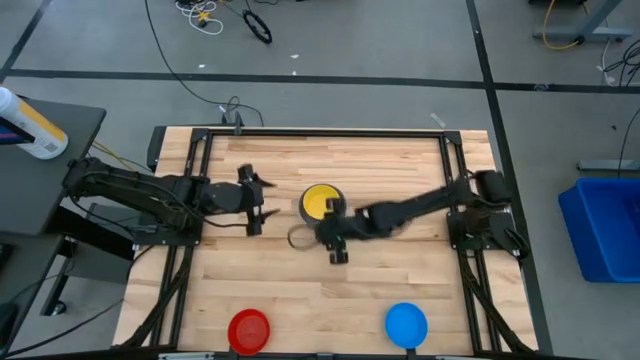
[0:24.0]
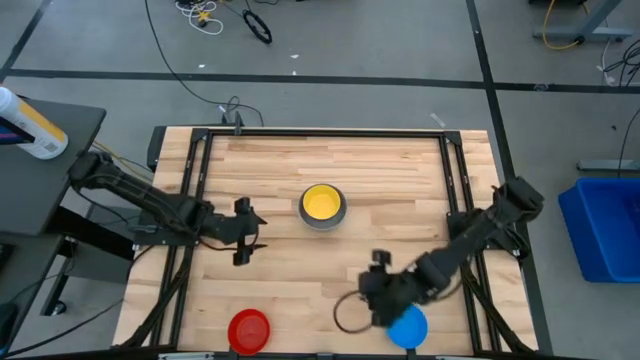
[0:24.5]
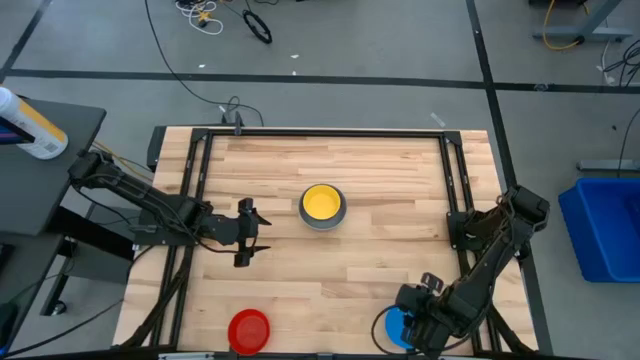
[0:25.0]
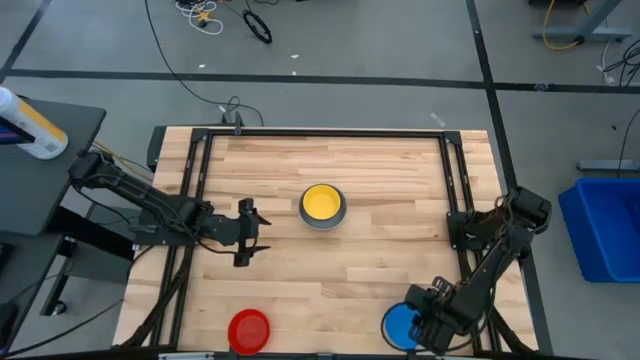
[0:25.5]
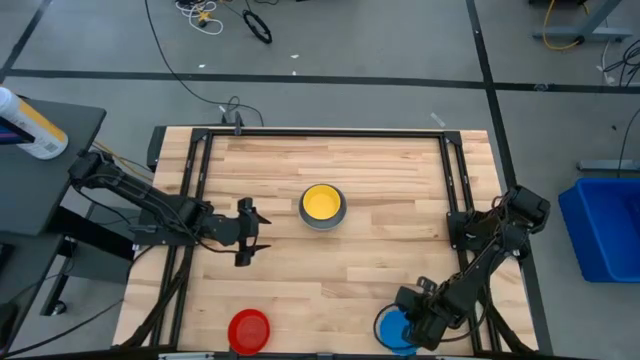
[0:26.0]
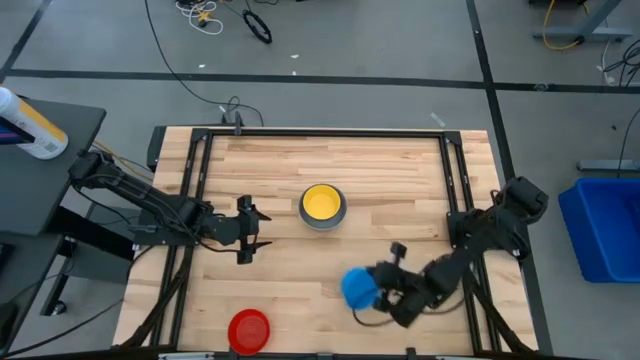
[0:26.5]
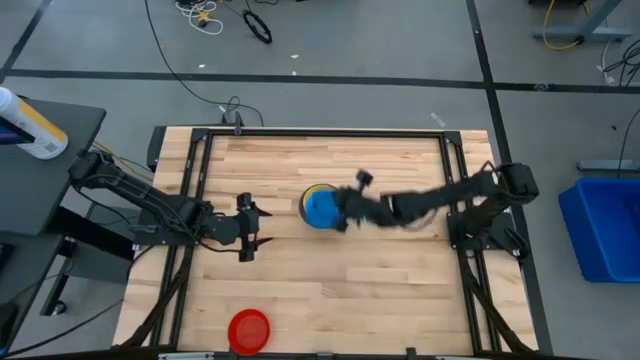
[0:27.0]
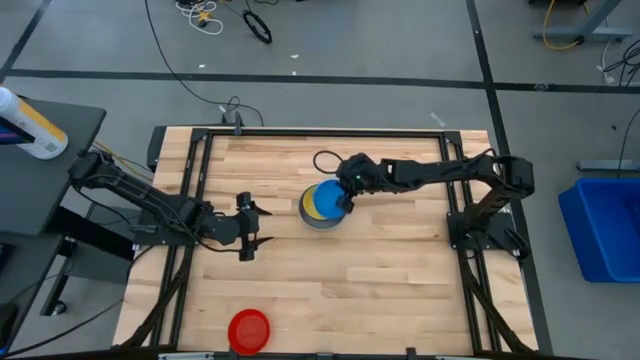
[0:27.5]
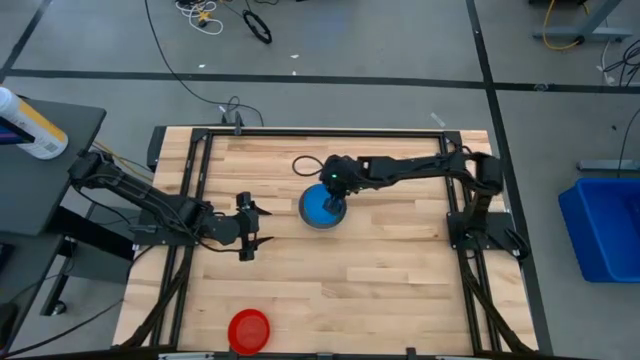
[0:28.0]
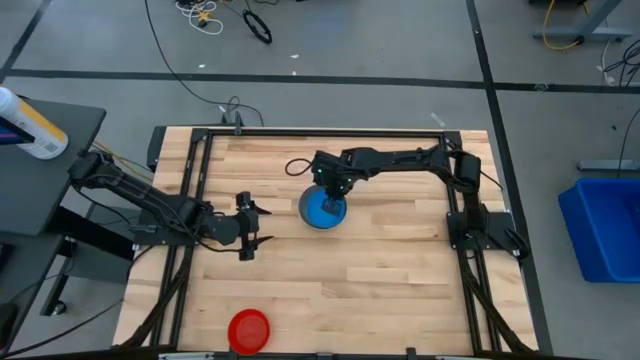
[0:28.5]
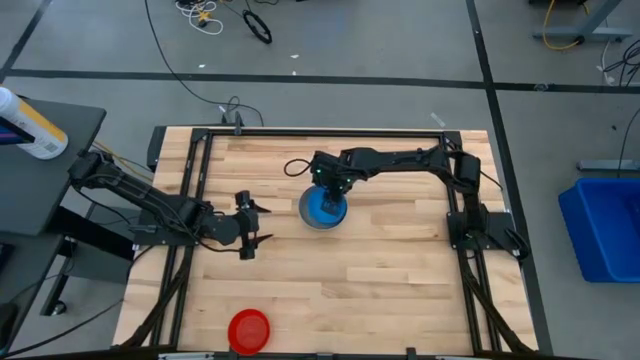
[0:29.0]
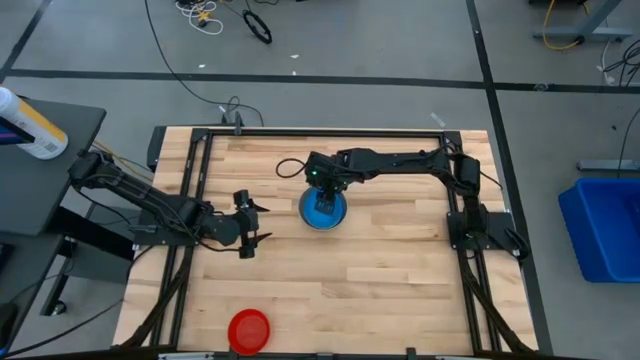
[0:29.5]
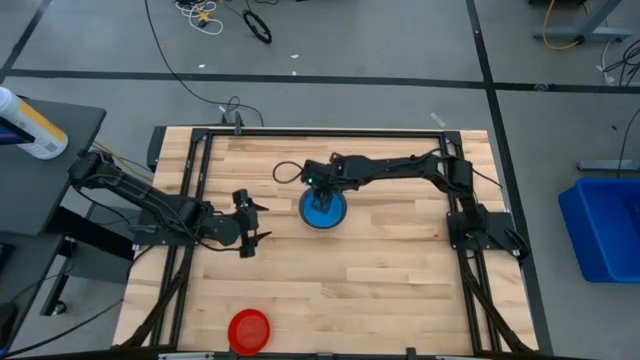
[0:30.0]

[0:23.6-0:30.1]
Stack the blue bowl in the yellow bowl

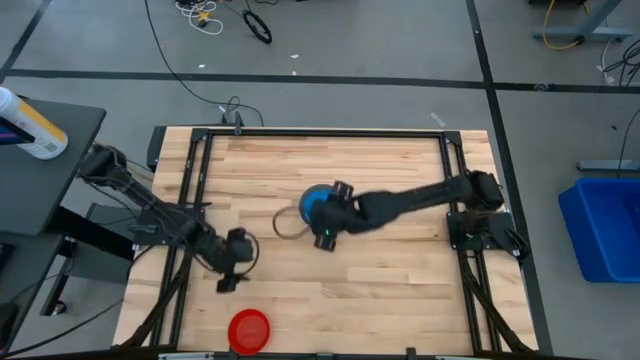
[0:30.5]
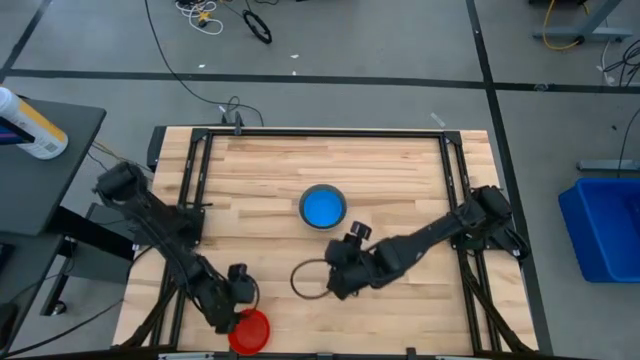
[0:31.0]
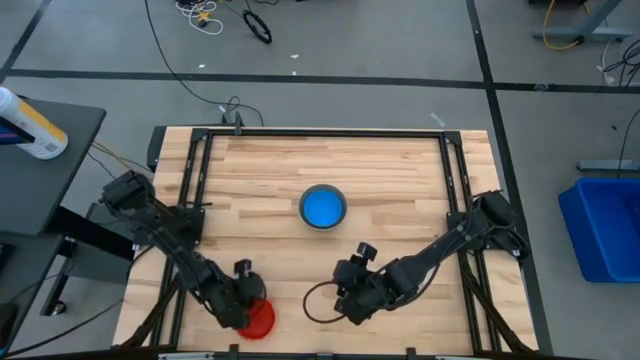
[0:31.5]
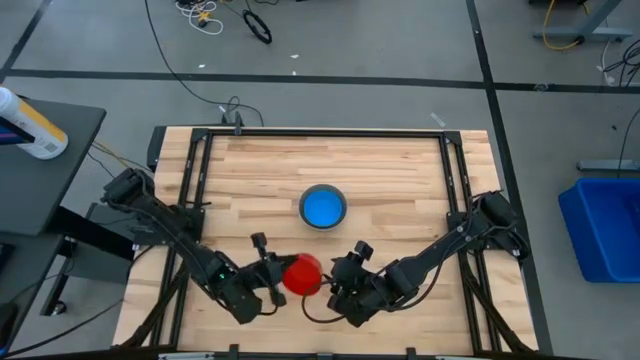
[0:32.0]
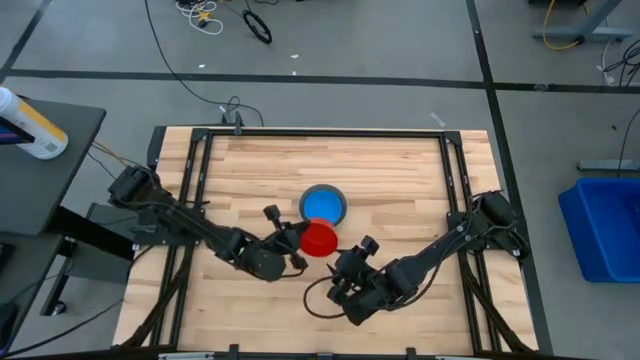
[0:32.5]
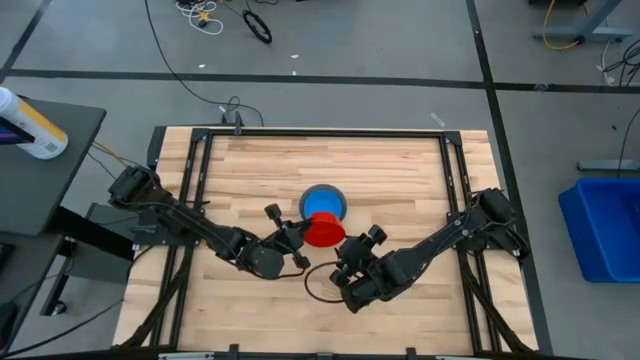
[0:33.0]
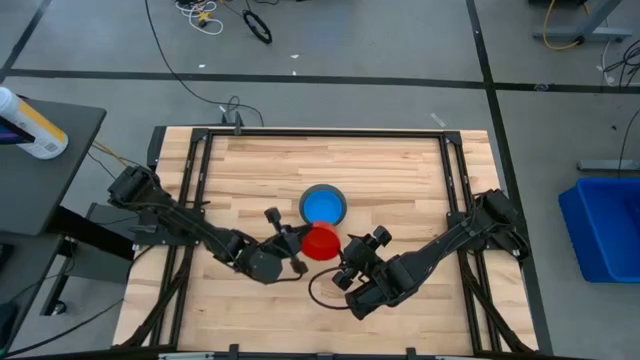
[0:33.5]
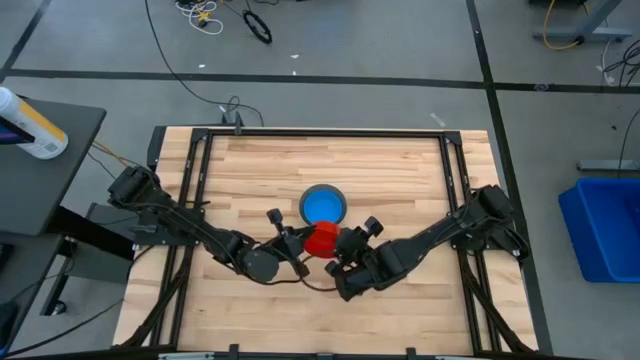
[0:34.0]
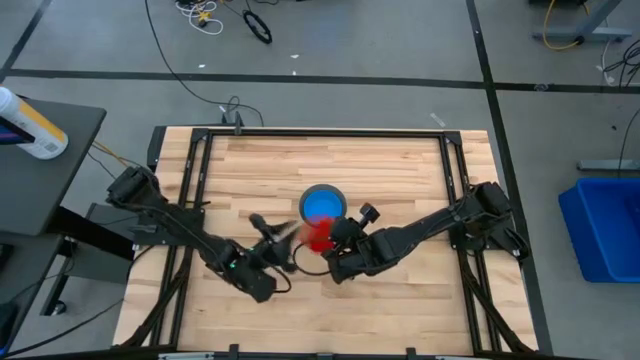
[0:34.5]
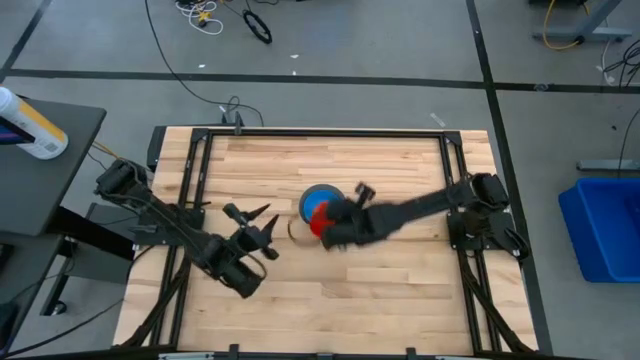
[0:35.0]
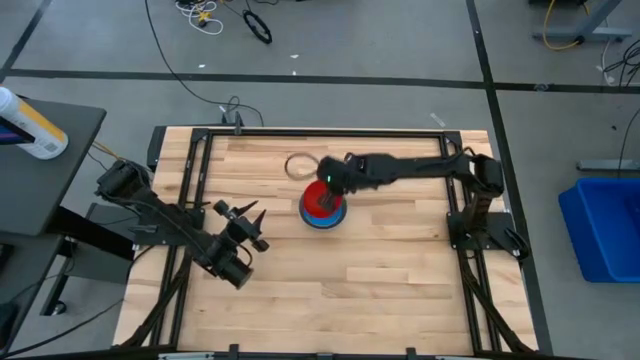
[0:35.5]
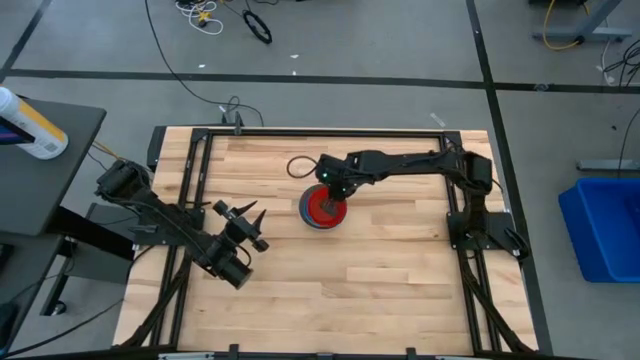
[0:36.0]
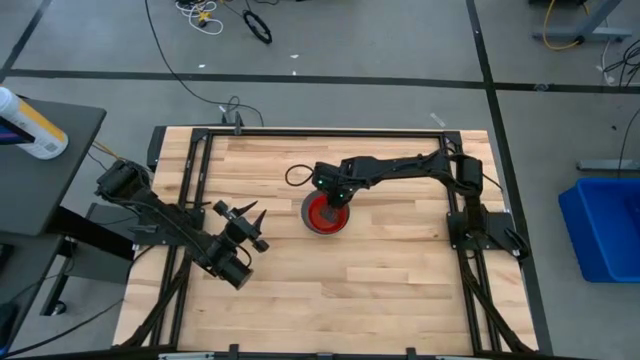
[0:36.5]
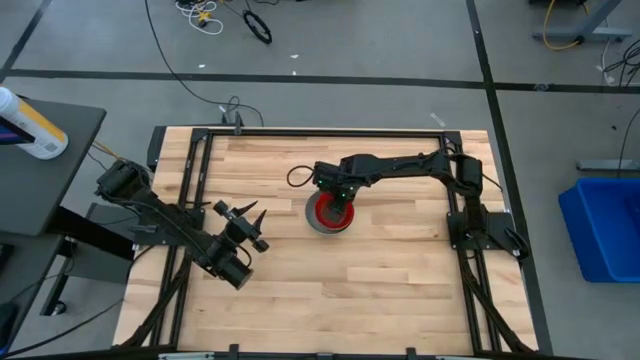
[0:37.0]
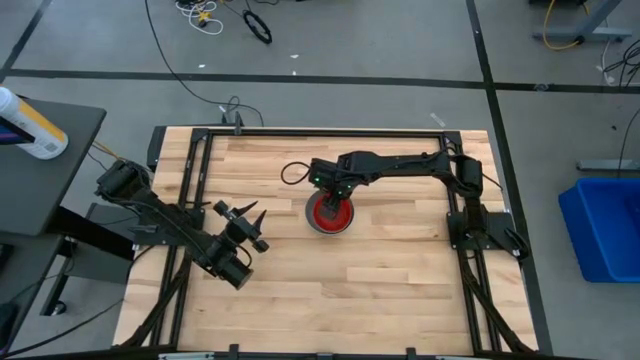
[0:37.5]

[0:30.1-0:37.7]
Stack the red bowl in the blue bowl

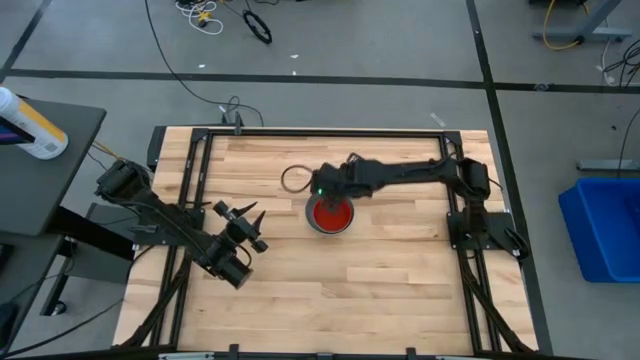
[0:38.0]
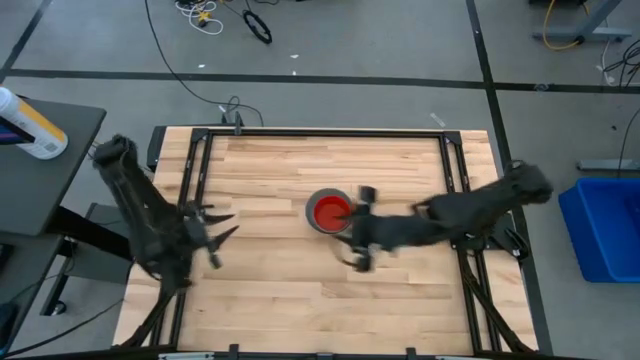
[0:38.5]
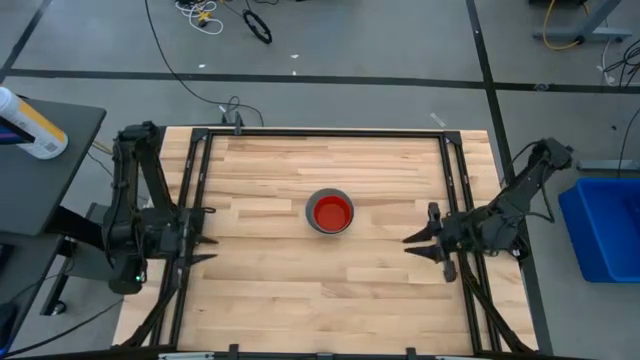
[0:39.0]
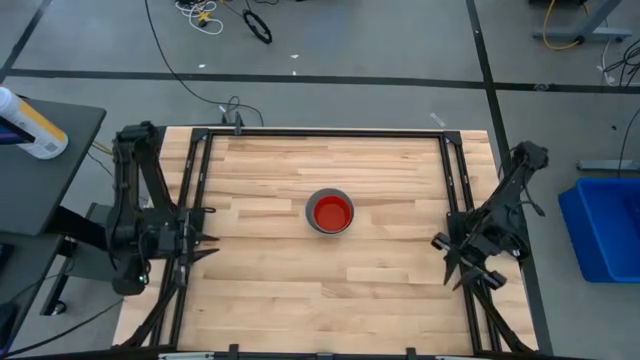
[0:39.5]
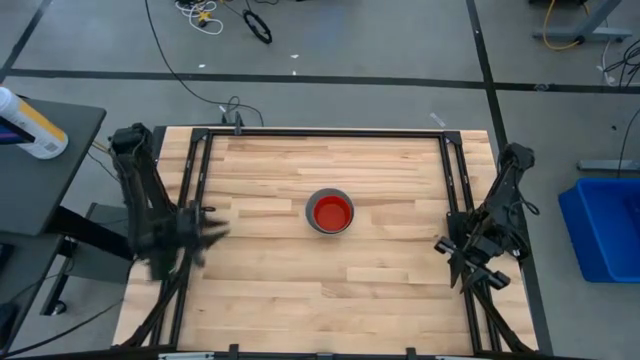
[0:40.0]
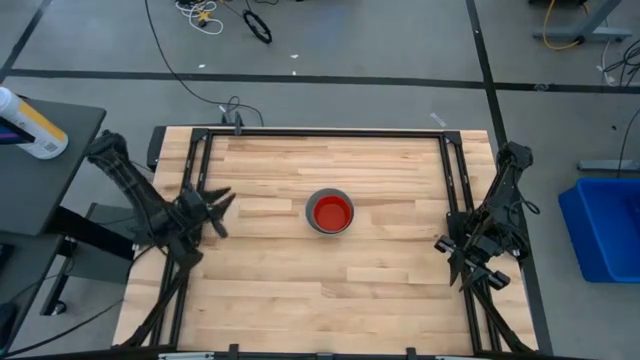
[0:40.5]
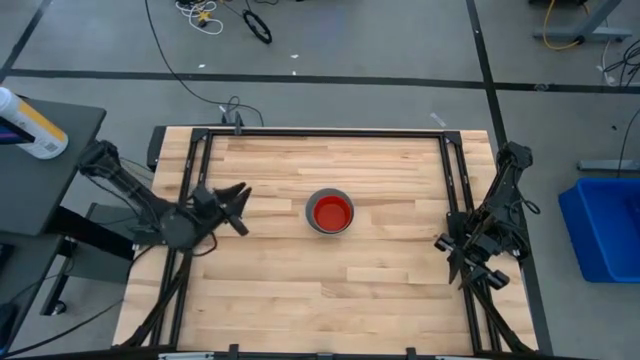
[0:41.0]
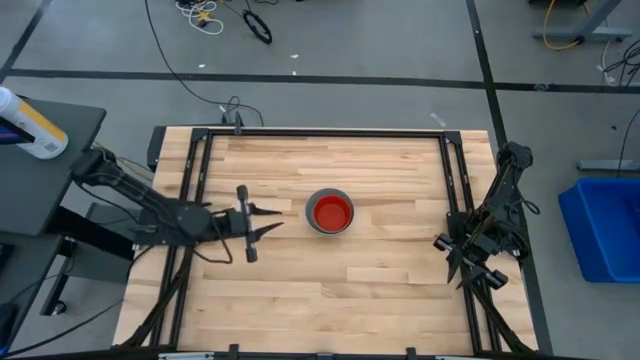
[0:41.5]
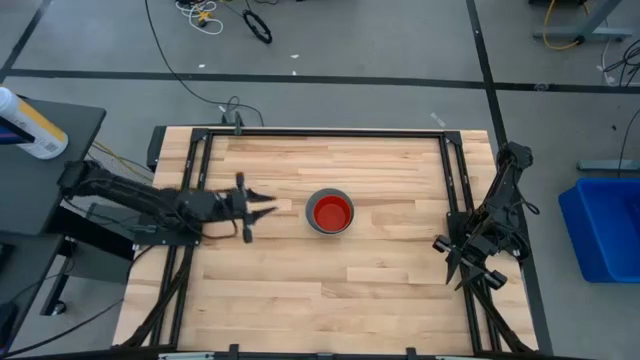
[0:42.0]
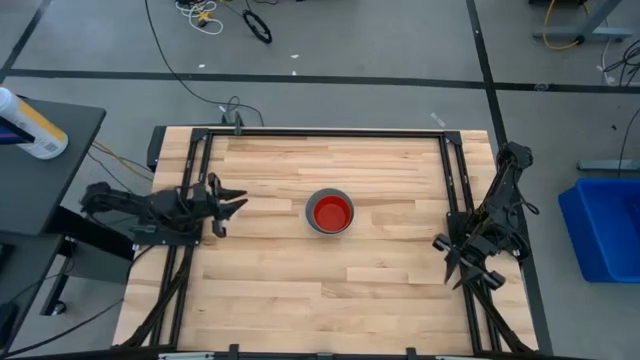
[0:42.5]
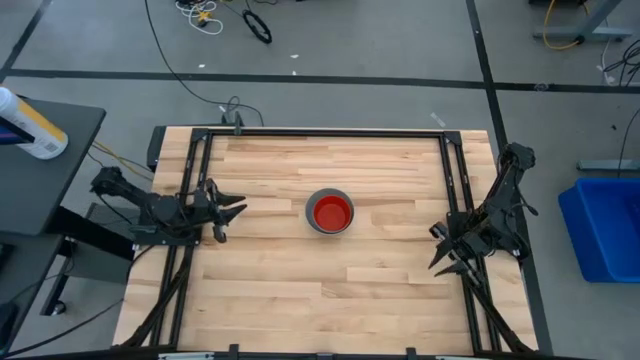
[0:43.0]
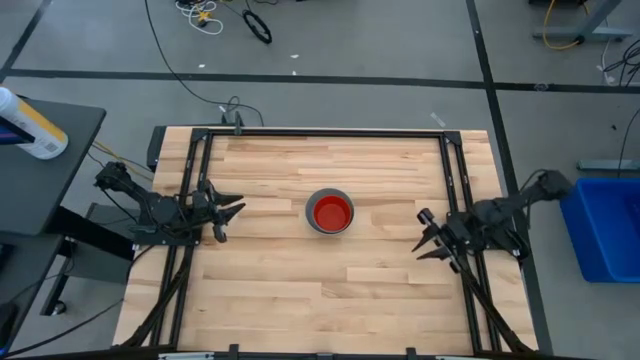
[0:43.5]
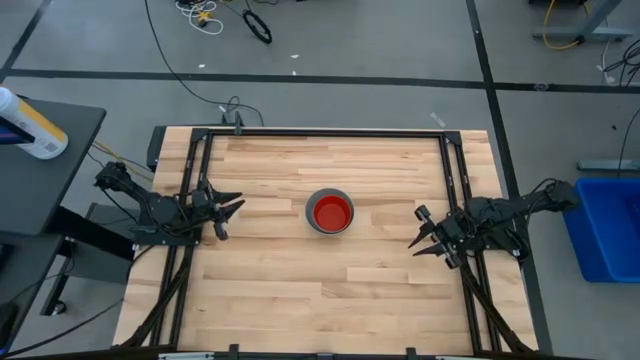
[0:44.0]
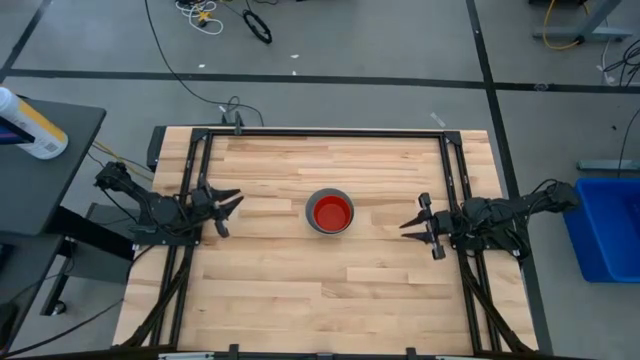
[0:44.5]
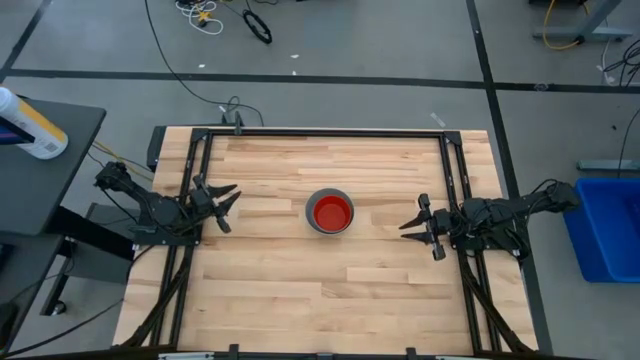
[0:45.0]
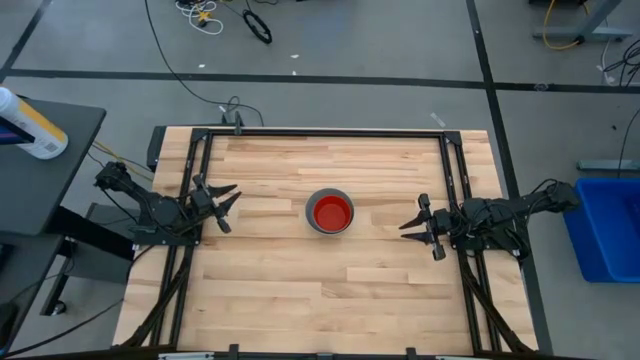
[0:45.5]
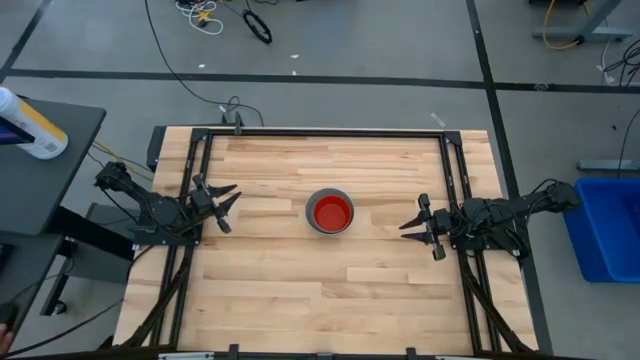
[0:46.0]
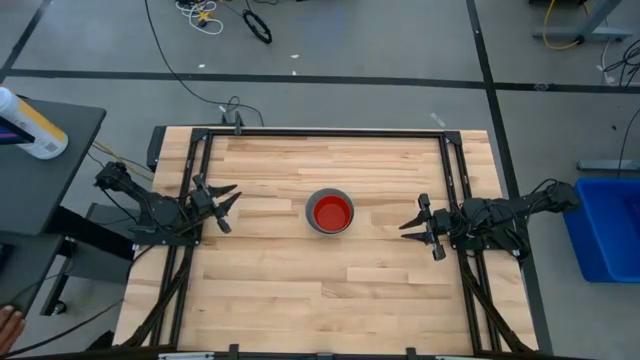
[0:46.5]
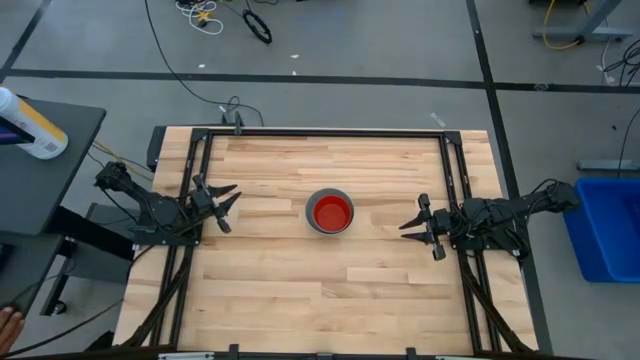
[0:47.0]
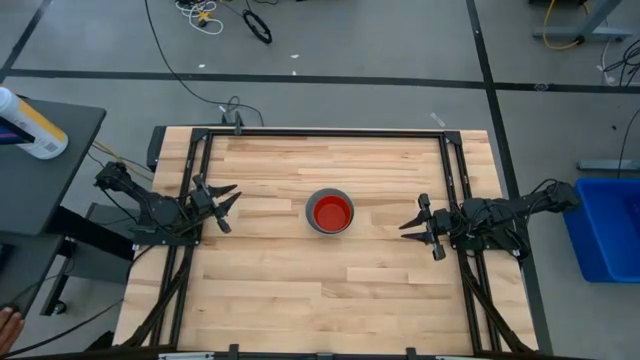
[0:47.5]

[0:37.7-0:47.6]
Return to Home Position
